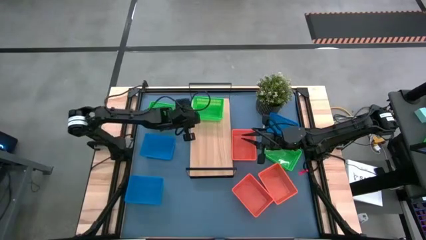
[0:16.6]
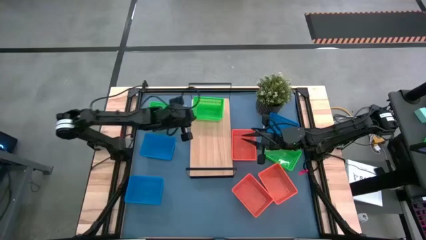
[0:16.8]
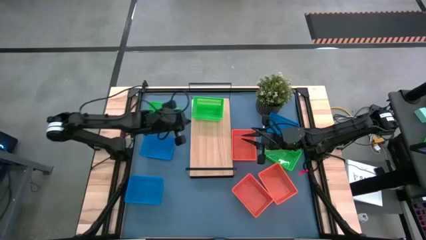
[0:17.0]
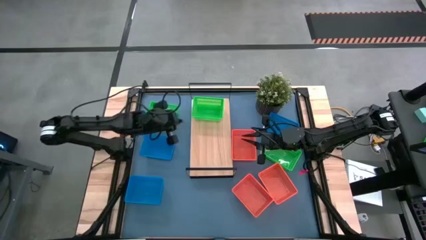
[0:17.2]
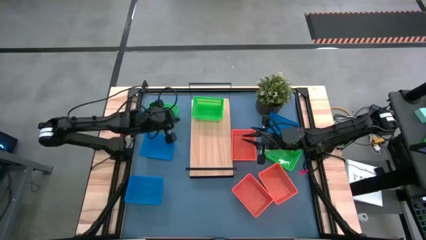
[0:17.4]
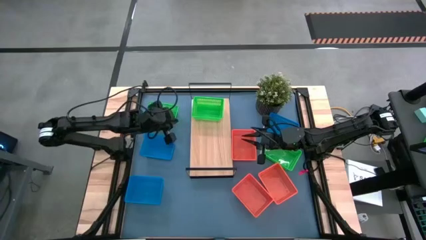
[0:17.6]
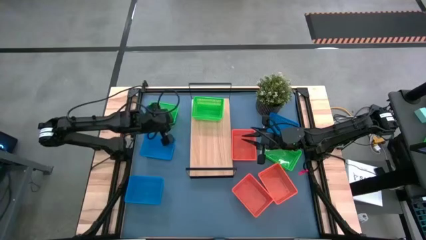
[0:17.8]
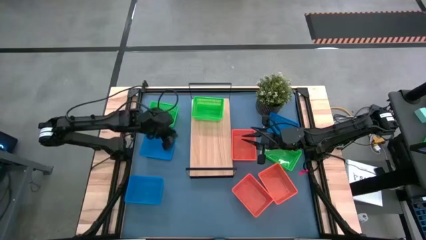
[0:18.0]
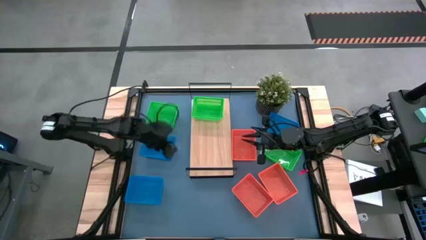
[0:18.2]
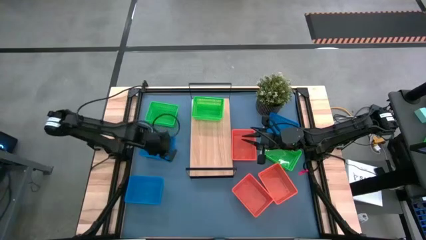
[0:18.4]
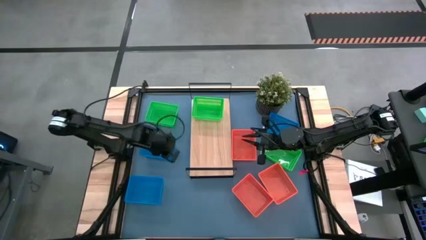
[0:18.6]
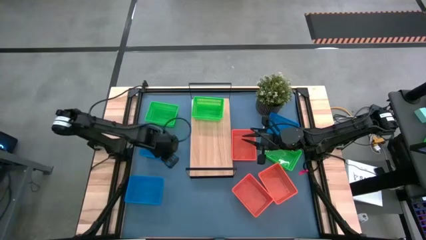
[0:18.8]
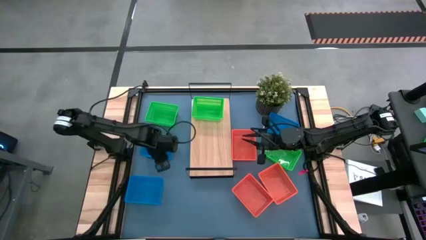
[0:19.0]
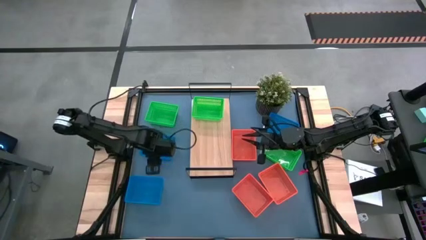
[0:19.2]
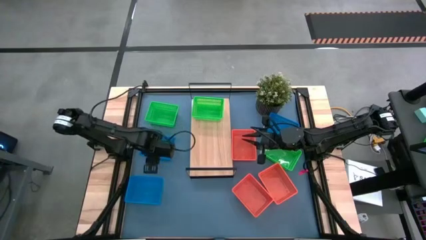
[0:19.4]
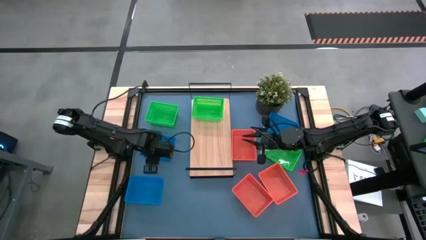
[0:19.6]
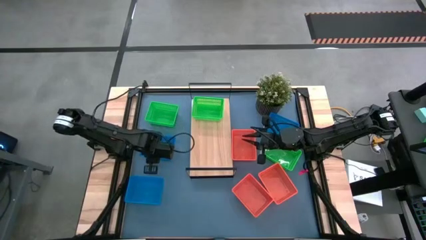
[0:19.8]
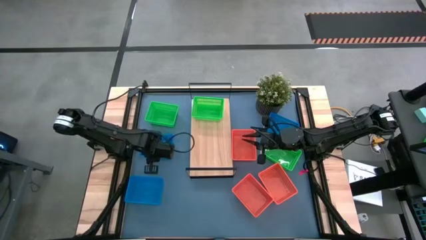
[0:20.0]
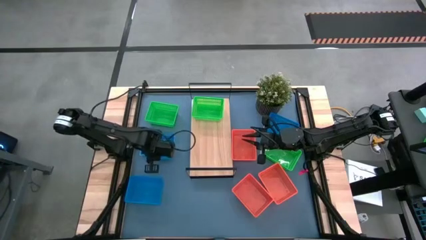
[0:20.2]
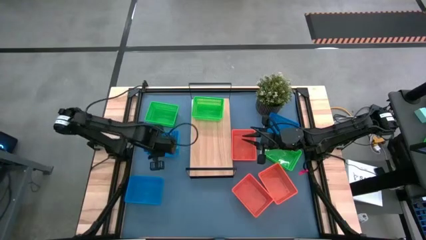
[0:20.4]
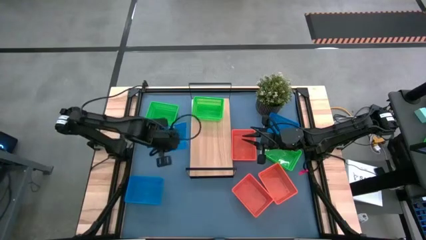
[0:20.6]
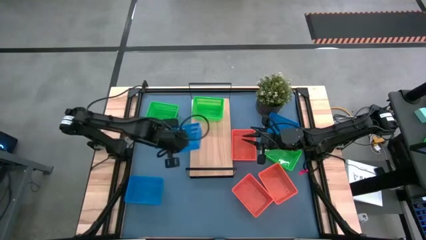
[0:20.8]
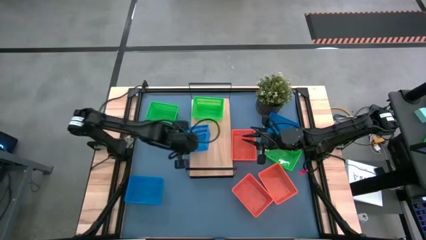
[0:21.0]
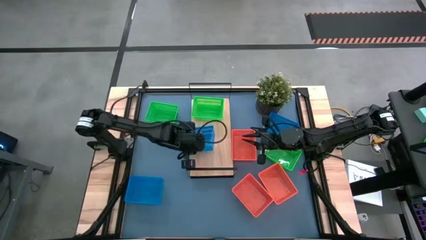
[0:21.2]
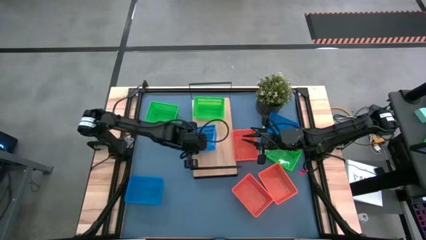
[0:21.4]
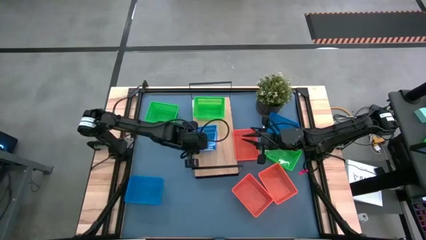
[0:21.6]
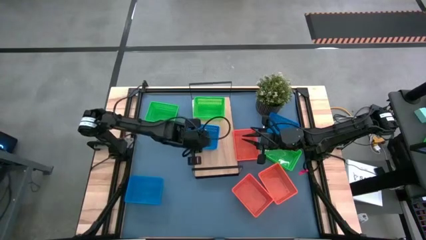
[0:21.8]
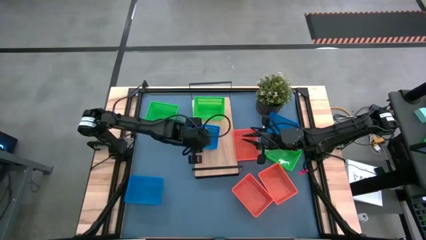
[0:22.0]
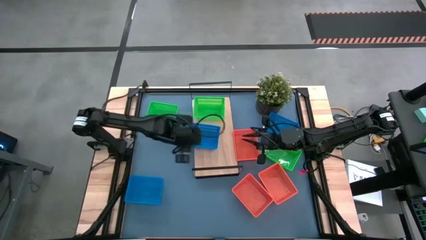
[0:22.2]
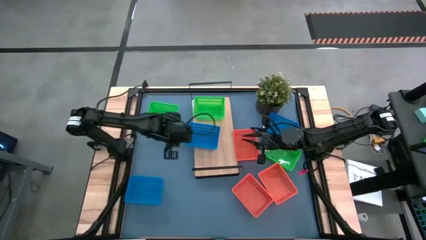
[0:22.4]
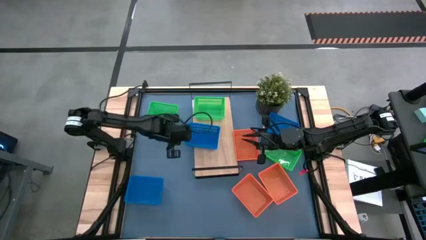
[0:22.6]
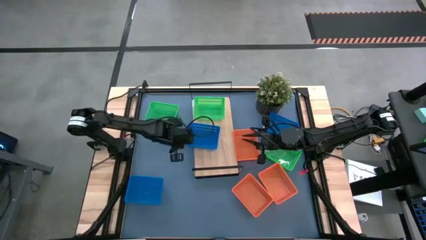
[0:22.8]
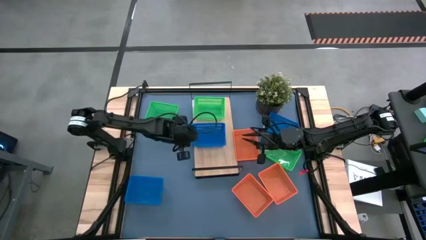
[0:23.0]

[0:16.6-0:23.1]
Task: Stack baskets on shelf by color
Put the middle blue bin on the shelf

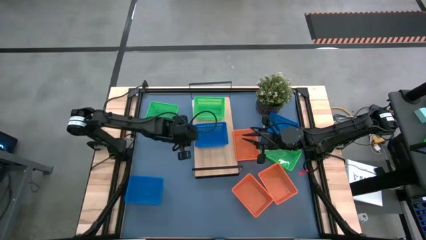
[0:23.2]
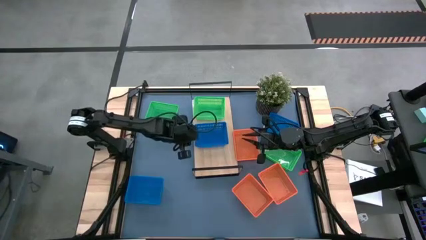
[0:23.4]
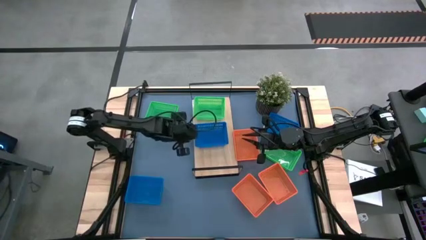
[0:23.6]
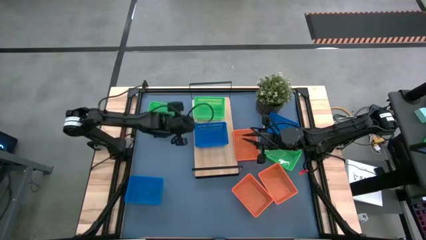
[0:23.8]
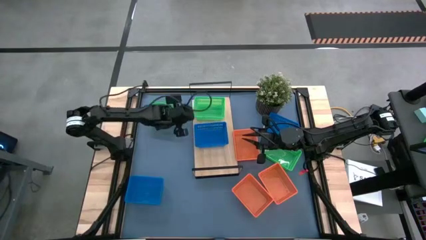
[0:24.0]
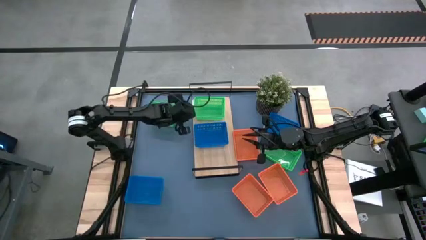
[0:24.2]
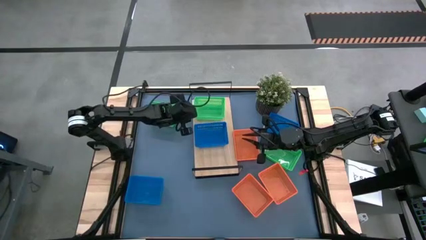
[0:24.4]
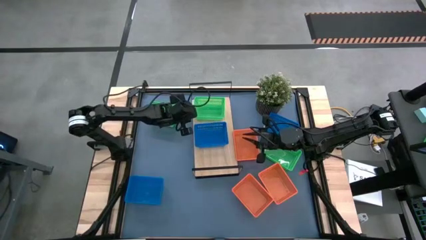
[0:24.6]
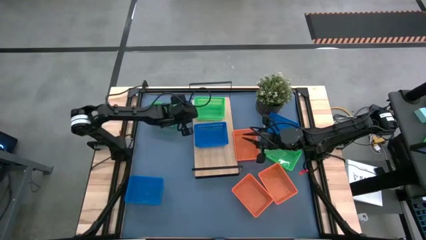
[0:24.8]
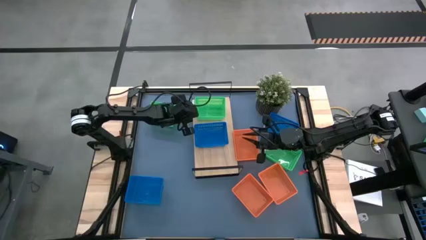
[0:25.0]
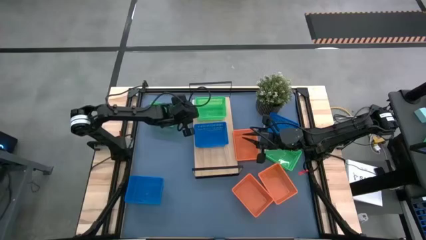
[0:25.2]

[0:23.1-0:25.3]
Adjust the green bin on the shelf
